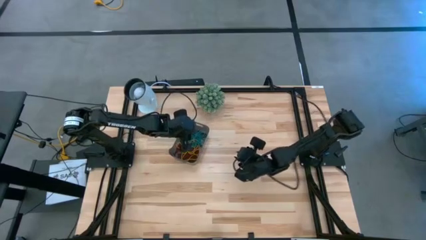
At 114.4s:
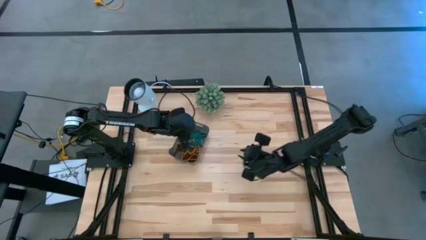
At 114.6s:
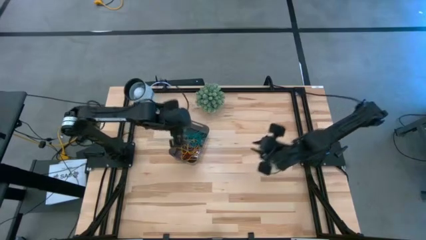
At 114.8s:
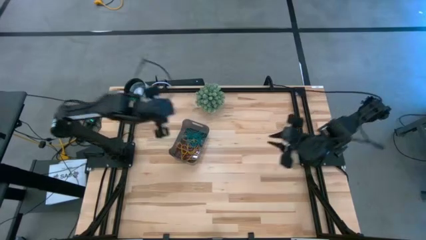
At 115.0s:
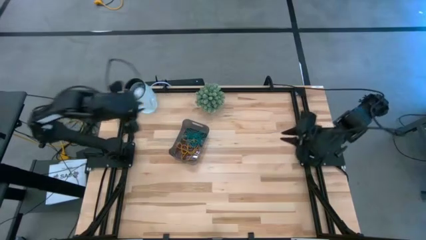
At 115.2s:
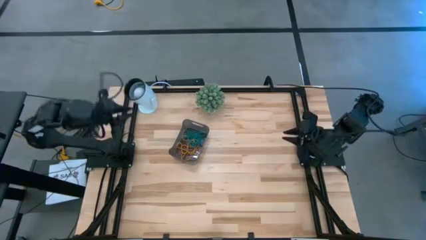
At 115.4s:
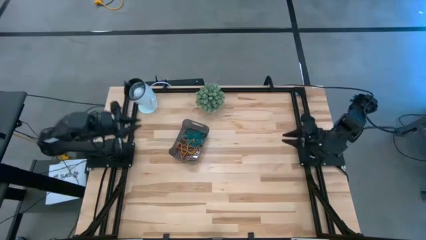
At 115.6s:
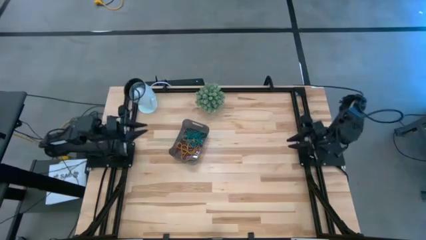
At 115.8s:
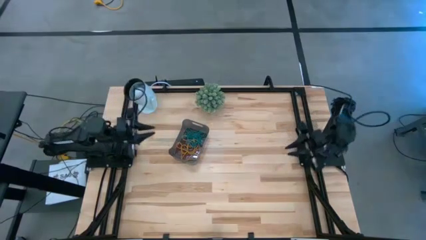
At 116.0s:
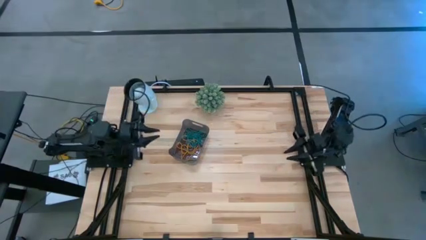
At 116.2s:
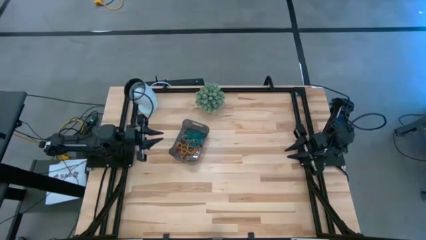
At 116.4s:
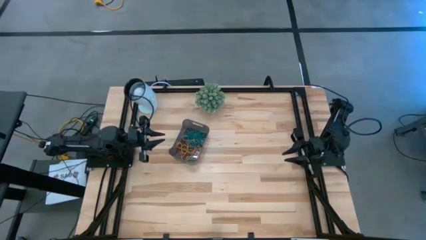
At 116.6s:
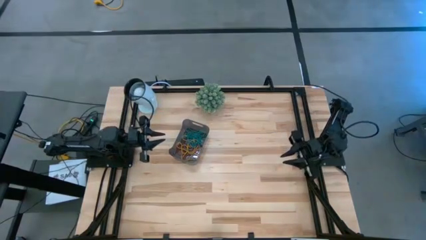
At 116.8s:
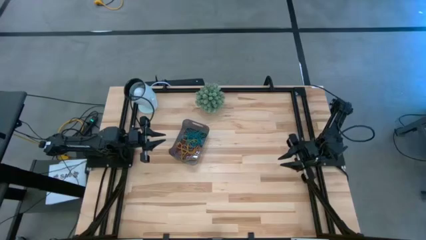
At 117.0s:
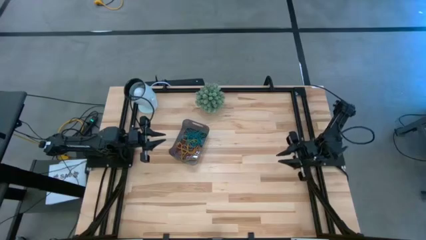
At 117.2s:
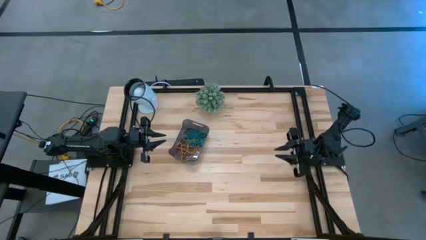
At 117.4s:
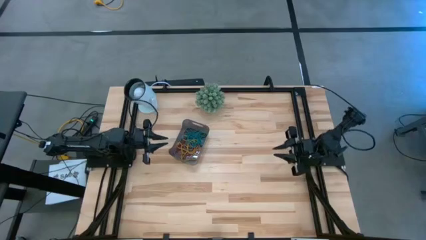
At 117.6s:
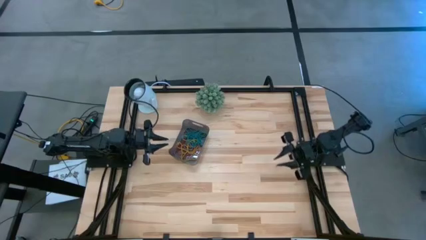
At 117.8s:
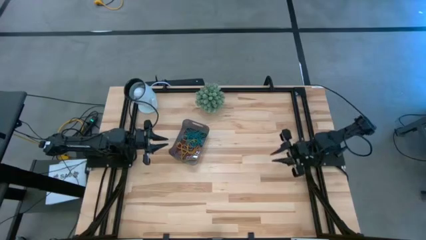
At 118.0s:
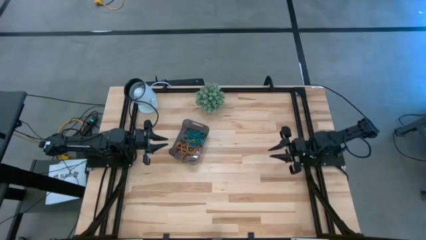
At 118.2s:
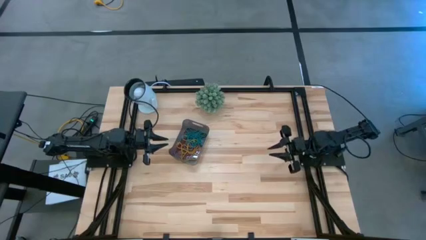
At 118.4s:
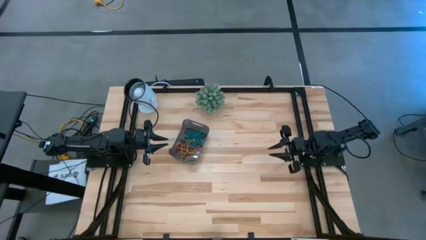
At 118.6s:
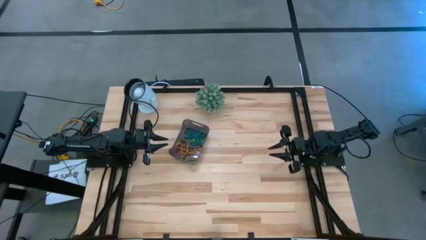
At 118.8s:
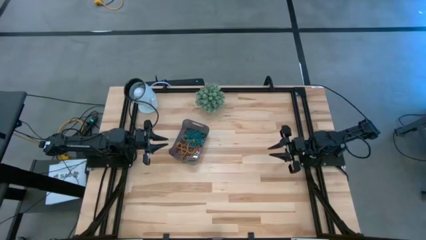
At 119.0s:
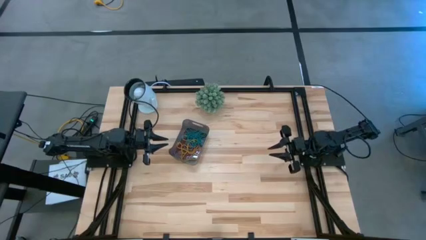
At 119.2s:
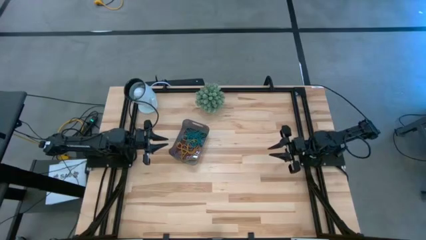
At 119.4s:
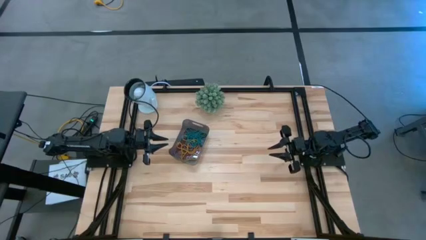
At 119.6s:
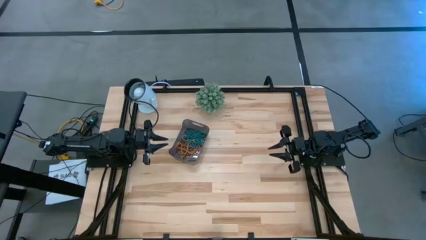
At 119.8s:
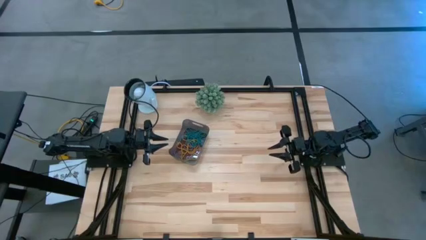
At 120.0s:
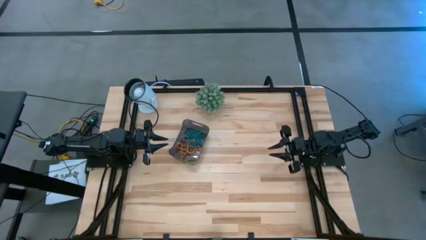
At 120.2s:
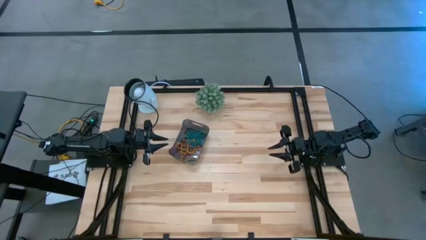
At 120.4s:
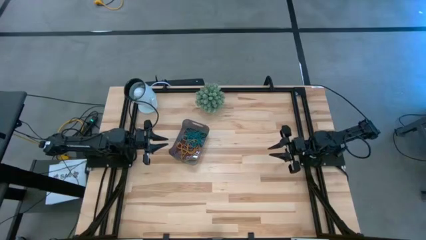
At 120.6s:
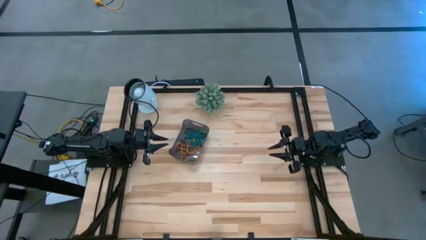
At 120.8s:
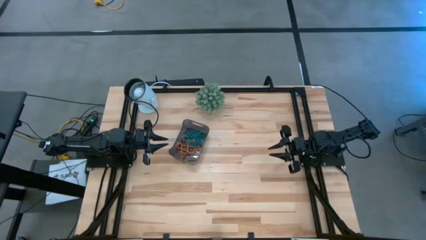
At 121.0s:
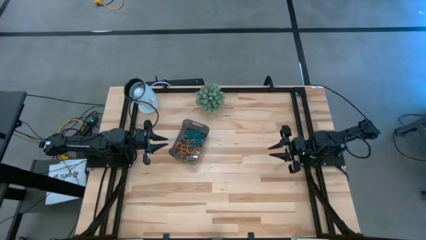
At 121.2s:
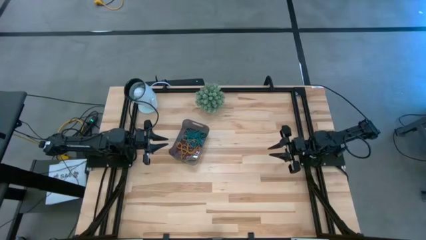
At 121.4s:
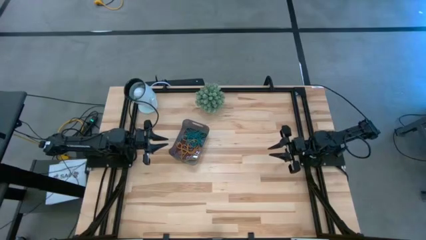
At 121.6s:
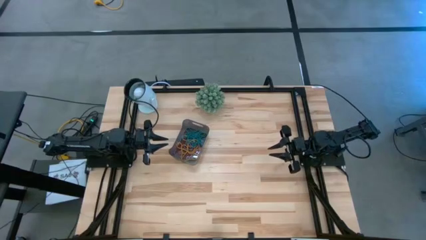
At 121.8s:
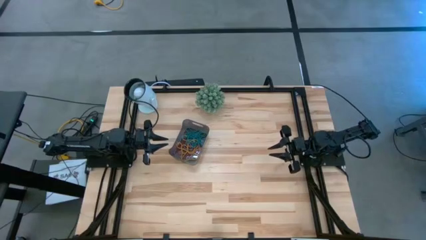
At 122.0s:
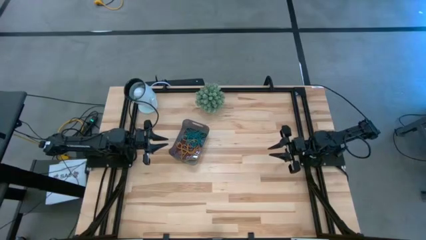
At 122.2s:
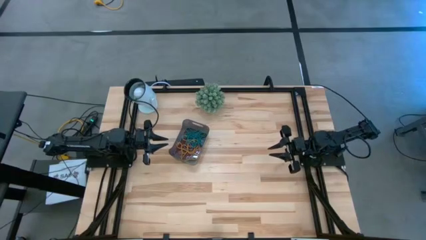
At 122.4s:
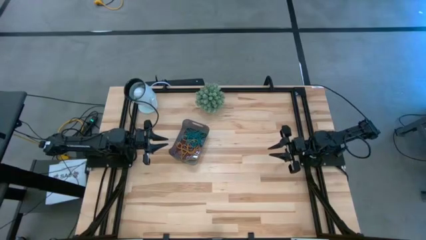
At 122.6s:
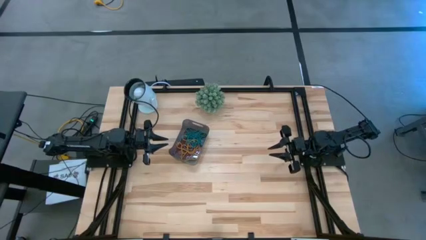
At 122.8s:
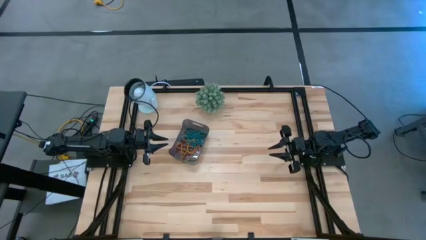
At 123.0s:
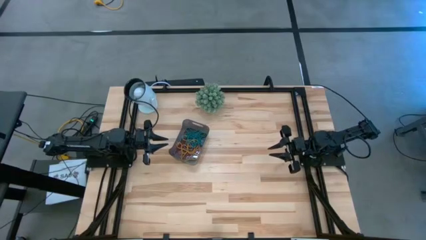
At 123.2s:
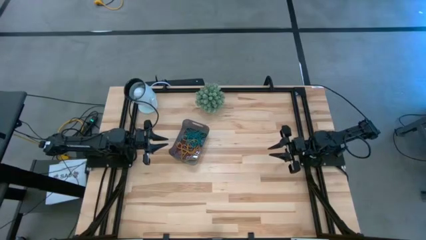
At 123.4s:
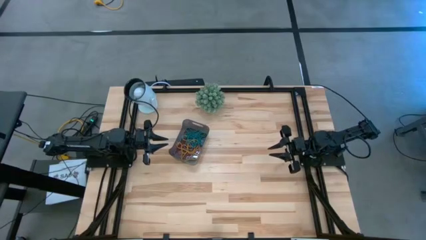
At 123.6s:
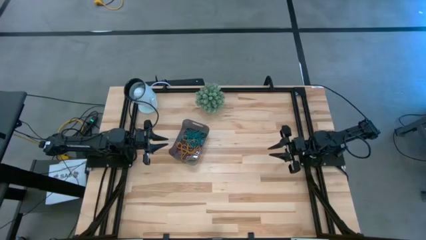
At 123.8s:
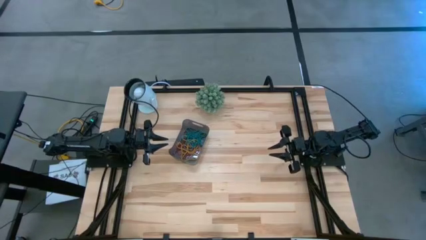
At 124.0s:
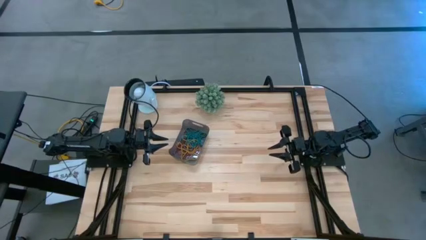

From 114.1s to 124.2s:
Task: Pick and place items into bin
Return to Home Position

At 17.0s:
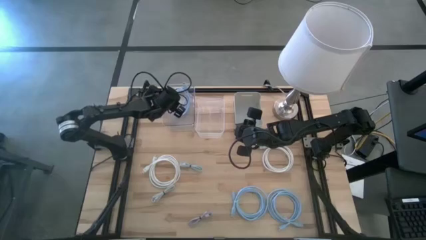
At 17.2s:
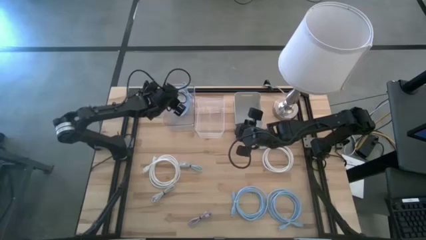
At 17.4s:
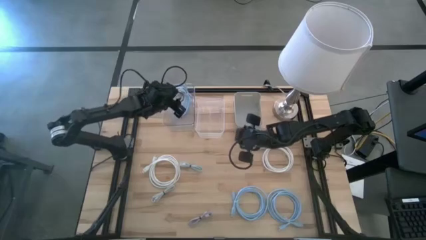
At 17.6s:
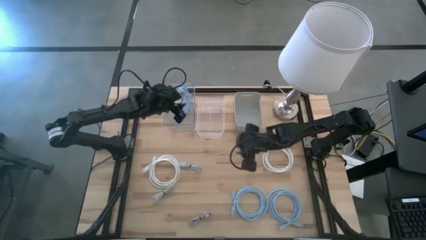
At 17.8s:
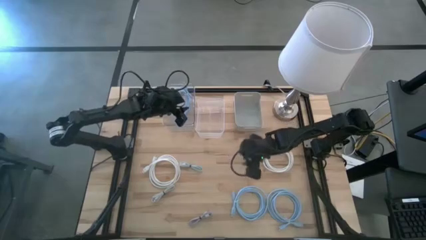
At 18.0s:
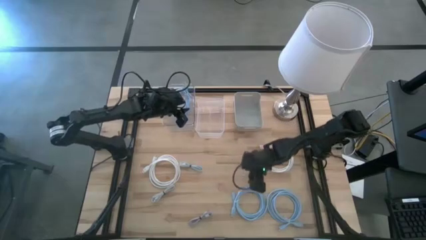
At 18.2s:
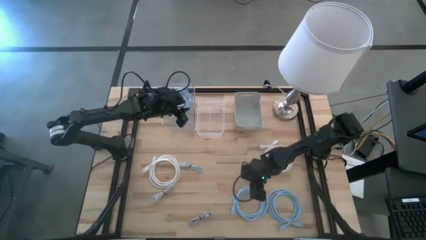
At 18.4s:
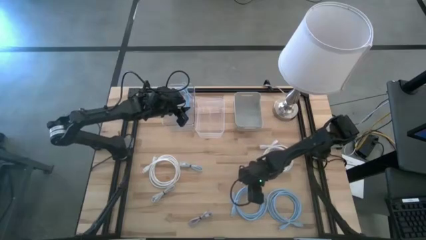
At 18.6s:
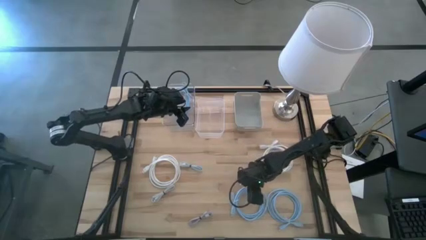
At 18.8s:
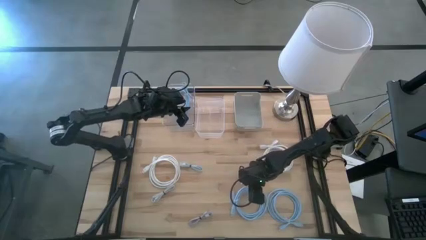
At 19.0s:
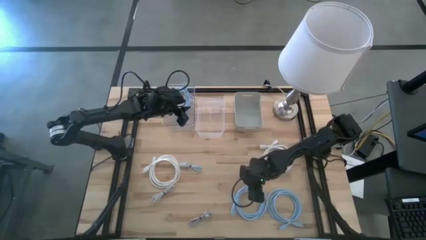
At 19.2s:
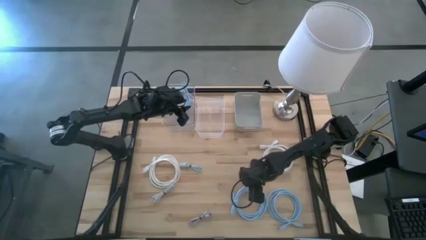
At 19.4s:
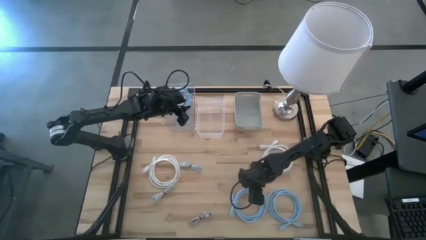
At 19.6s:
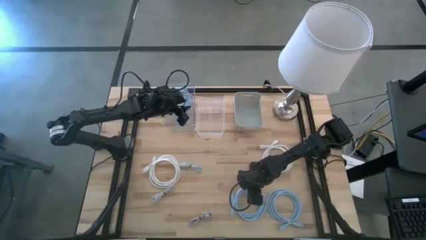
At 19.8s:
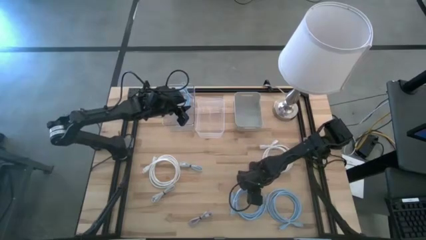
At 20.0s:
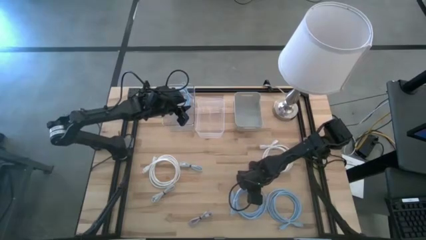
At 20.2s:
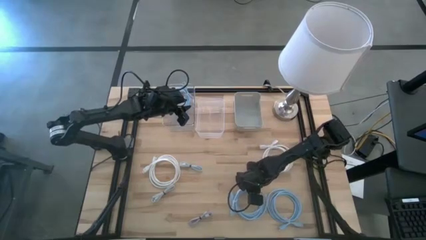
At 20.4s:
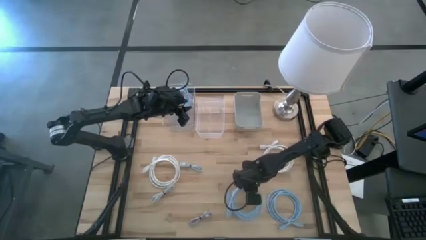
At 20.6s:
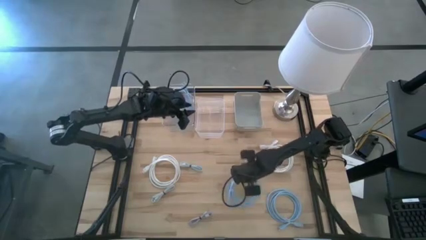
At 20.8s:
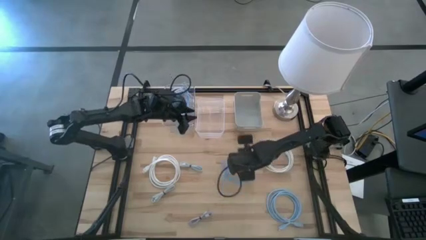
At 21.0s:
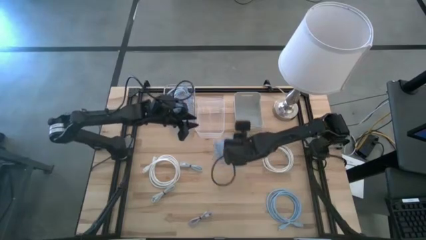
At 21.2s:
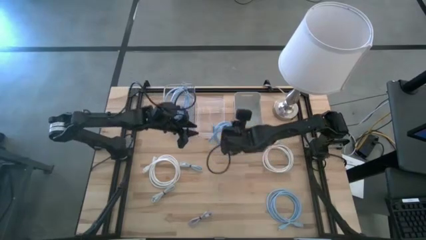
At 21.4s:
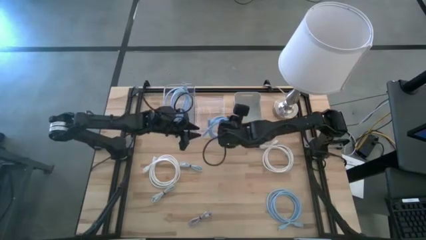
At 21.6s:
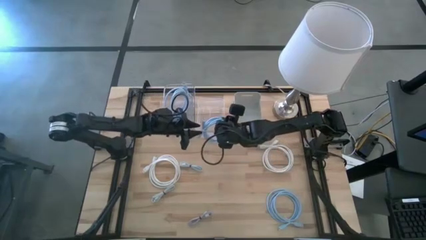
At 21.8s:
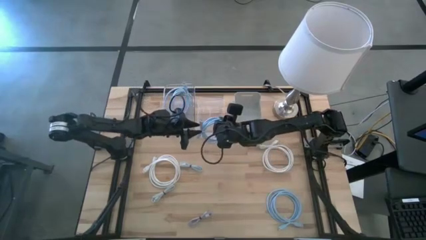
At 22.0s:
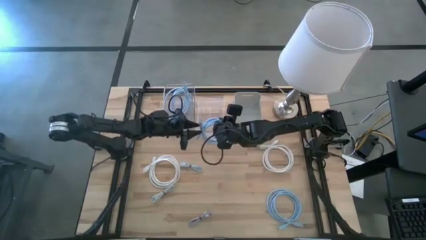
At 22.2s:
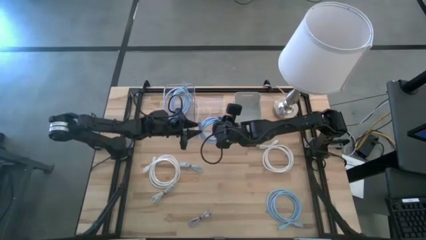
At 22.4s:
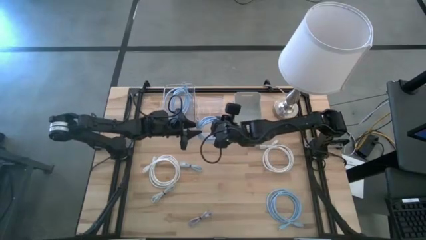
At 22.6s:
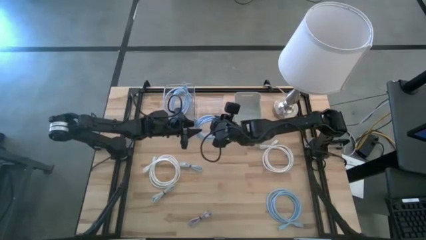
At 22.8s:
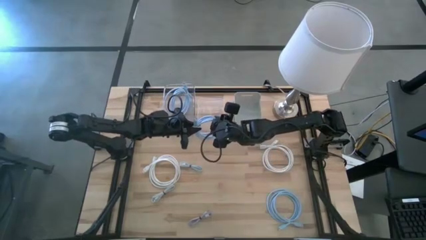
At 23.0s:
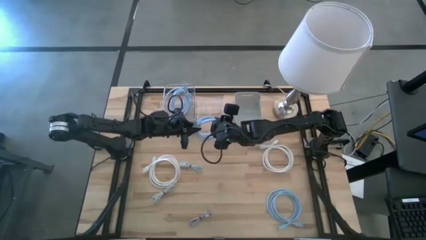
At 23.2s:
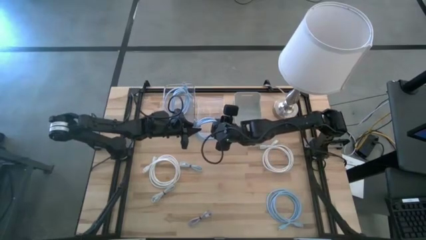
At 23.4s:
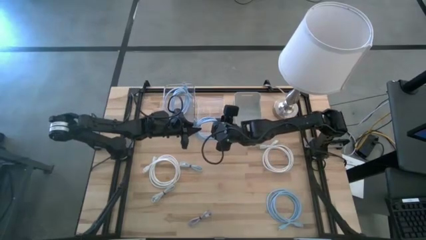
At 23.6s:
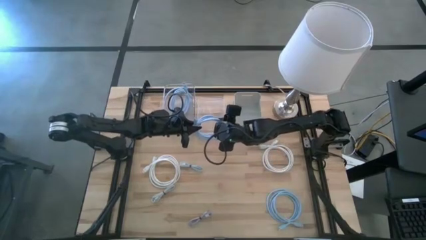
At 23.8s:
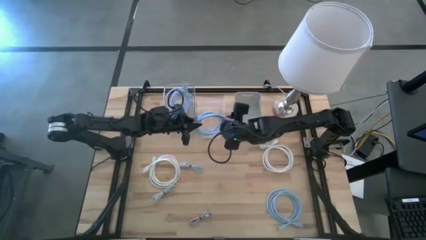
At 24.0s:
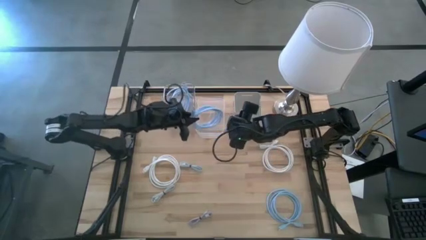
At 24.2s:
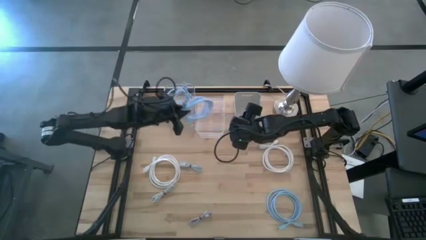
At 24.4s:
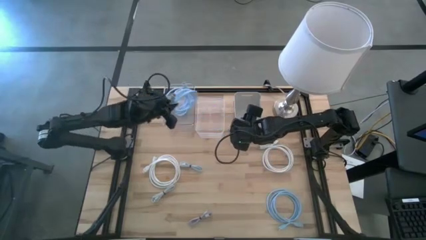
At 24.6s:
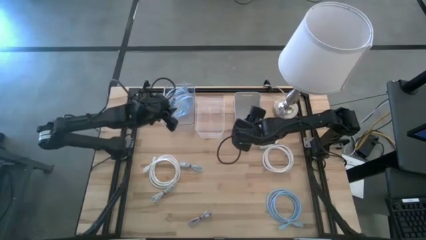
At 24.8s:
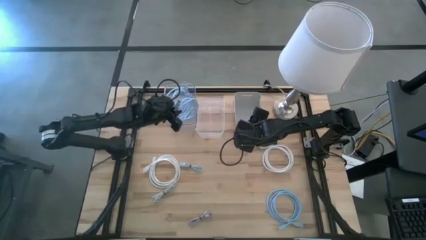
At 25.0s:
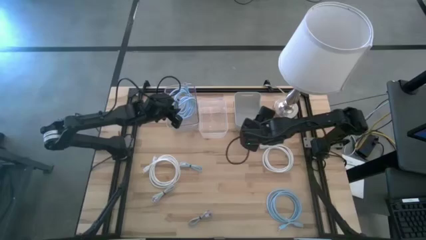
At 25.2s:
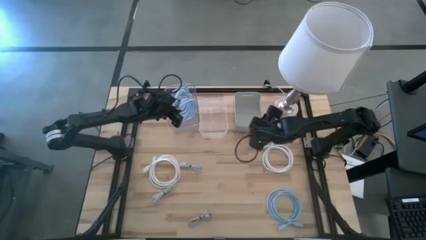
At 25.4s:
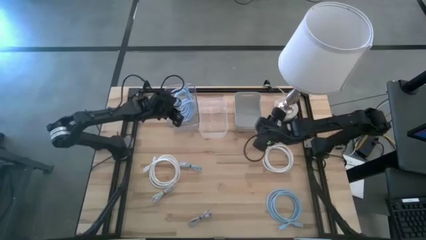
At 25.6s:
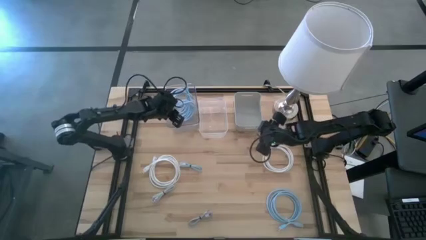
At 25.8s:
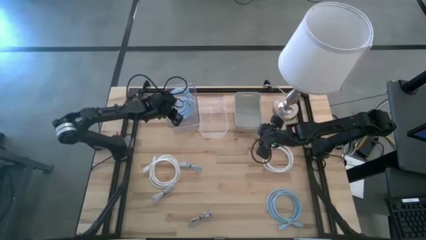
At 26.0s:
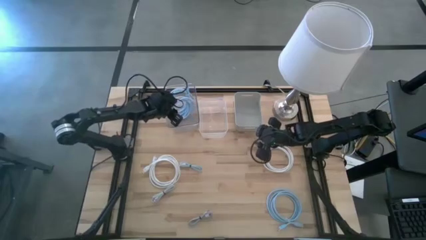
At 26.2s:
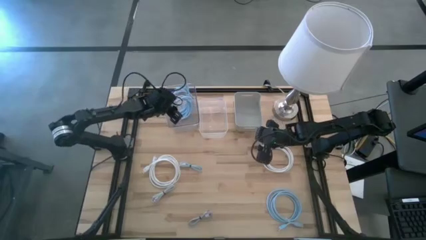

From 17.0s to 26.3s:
Task: Pick & Place USB Port
Put the left blue hdmi cable into the left transparent bin
